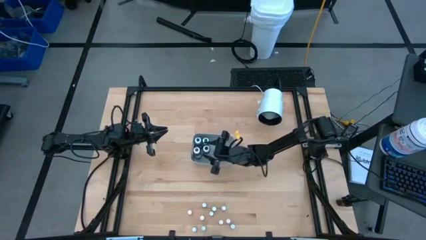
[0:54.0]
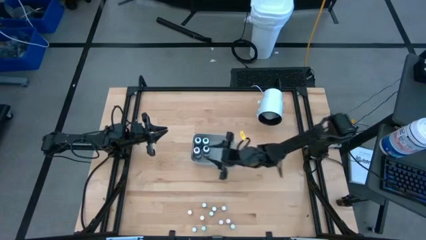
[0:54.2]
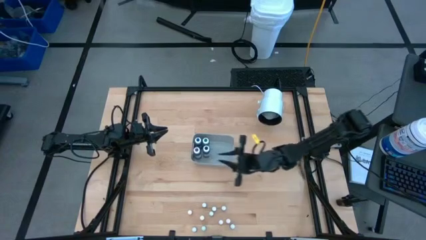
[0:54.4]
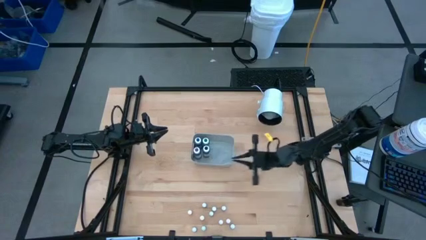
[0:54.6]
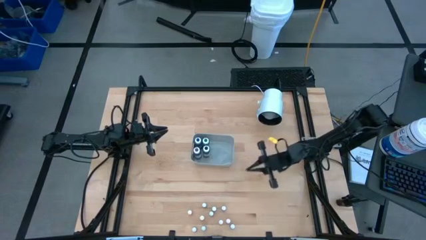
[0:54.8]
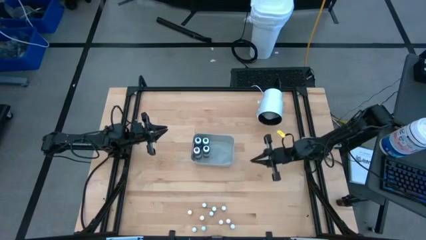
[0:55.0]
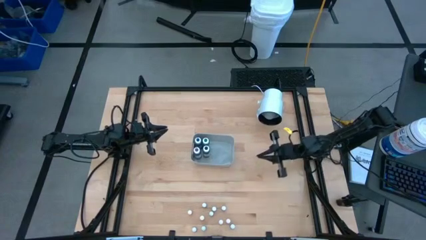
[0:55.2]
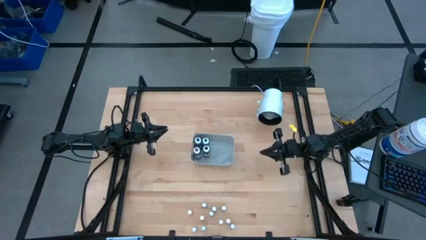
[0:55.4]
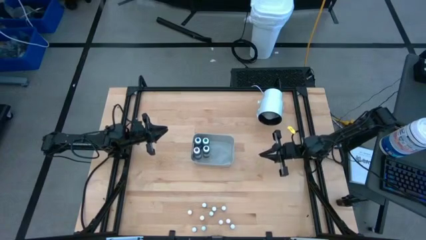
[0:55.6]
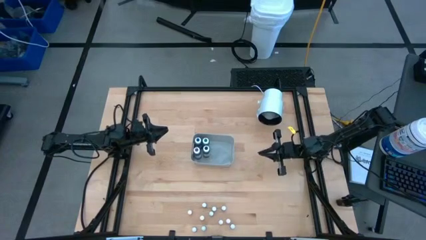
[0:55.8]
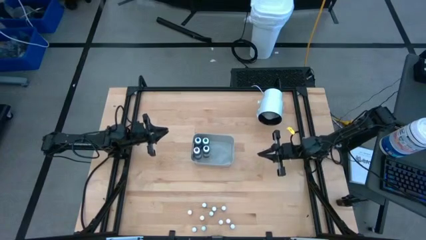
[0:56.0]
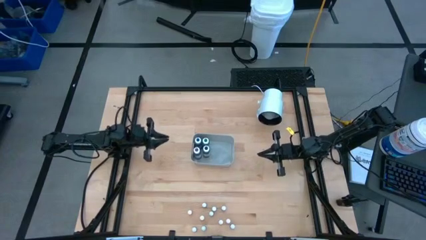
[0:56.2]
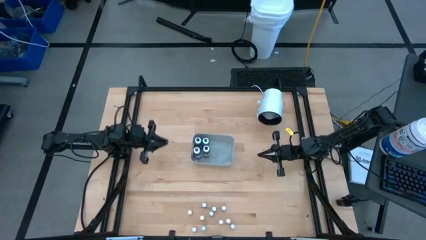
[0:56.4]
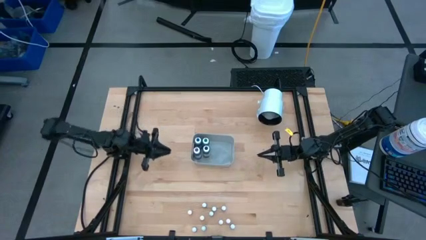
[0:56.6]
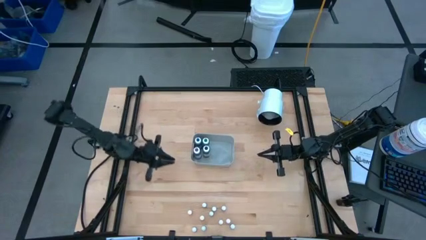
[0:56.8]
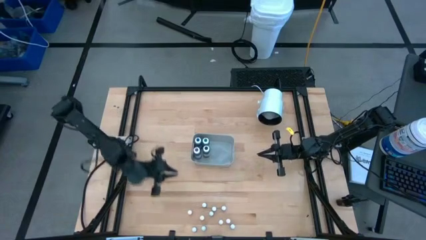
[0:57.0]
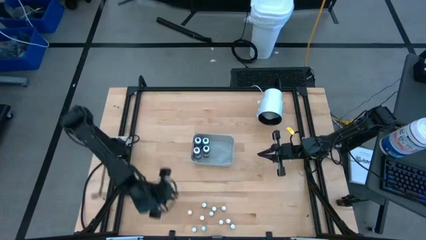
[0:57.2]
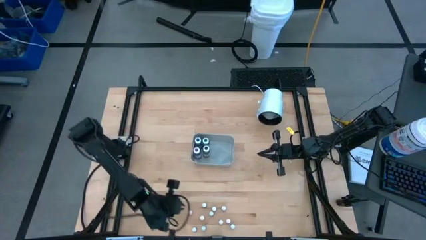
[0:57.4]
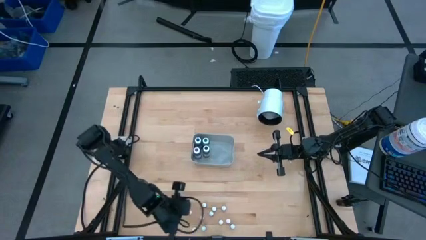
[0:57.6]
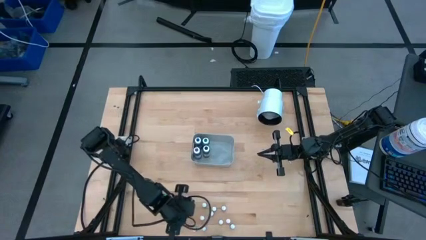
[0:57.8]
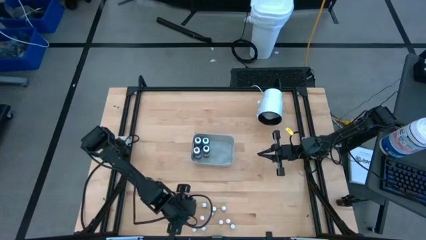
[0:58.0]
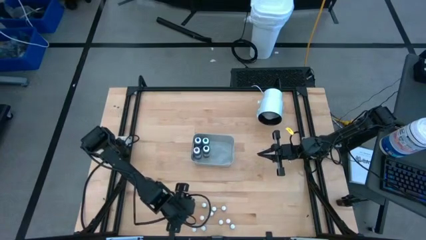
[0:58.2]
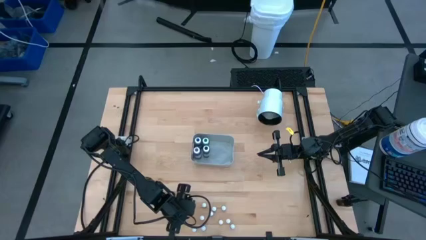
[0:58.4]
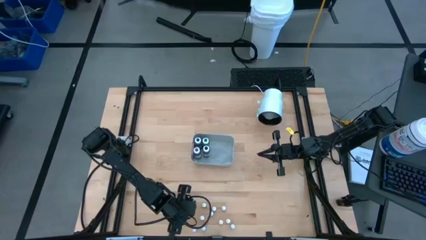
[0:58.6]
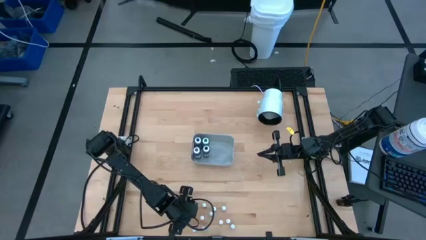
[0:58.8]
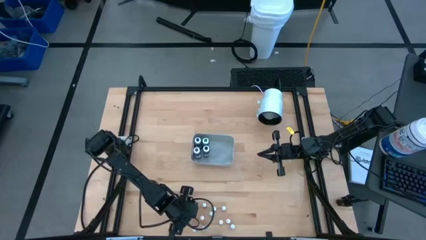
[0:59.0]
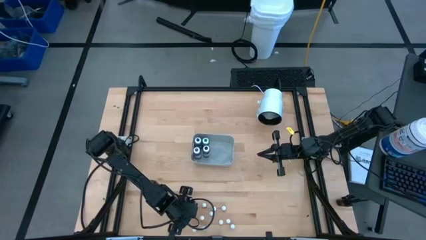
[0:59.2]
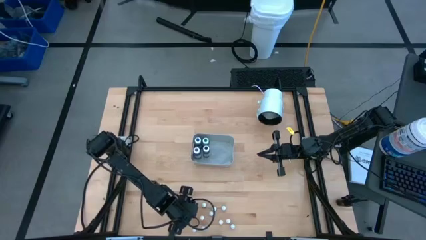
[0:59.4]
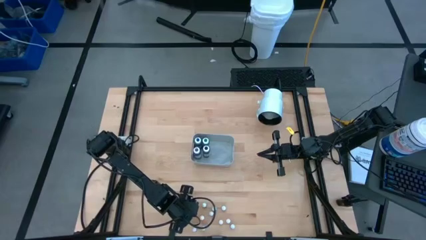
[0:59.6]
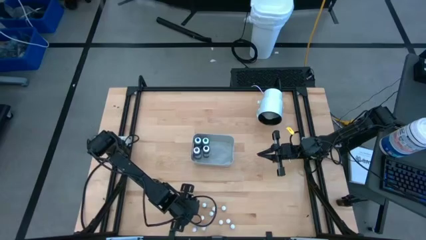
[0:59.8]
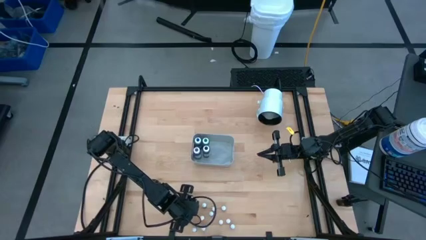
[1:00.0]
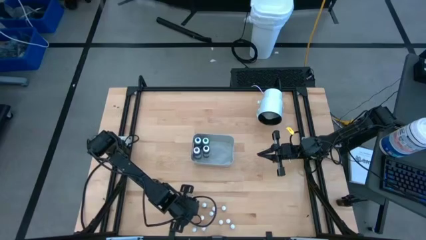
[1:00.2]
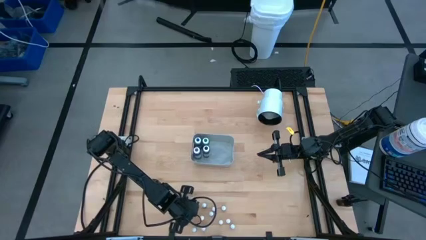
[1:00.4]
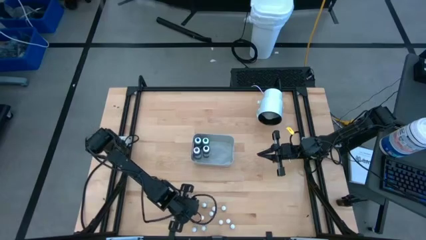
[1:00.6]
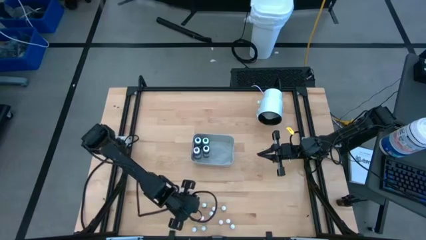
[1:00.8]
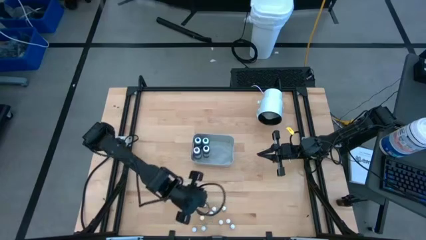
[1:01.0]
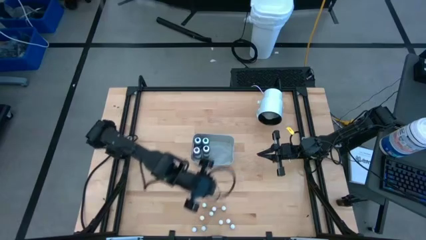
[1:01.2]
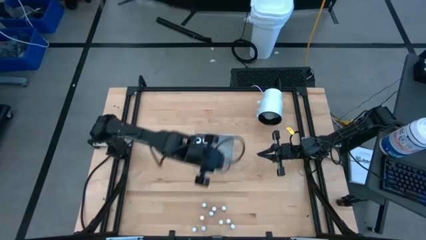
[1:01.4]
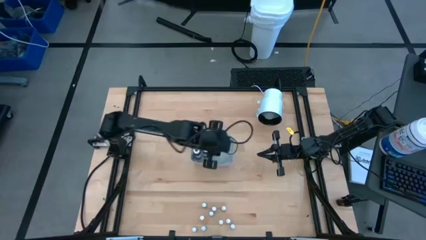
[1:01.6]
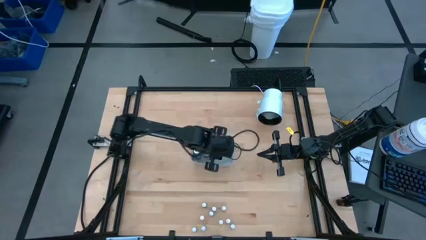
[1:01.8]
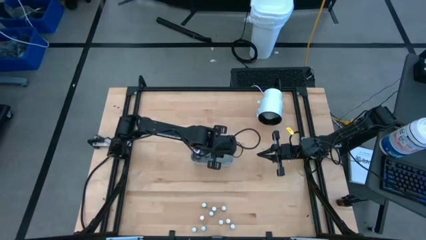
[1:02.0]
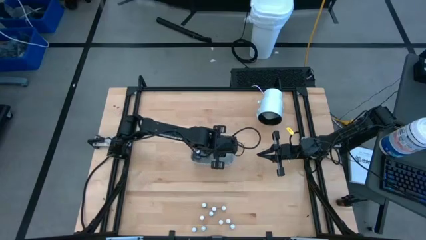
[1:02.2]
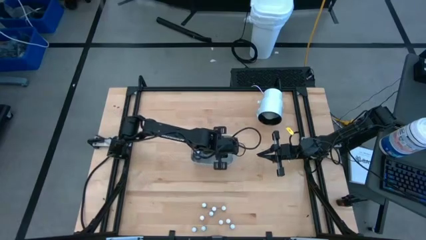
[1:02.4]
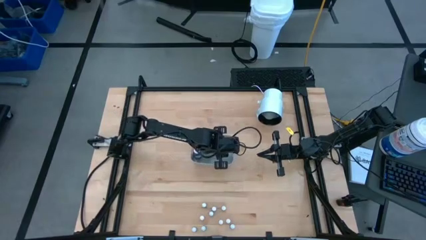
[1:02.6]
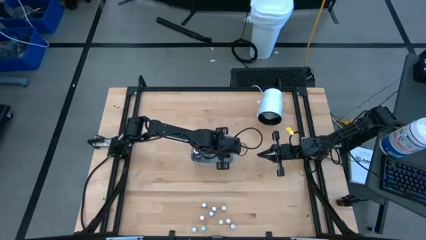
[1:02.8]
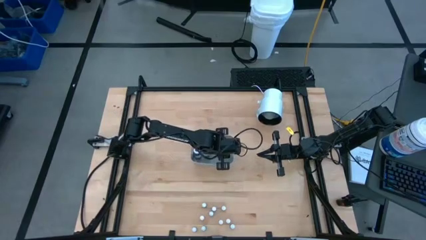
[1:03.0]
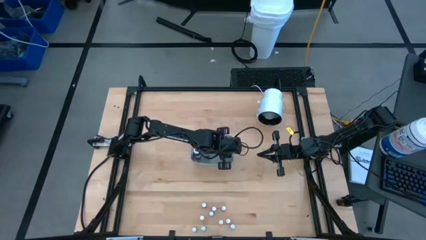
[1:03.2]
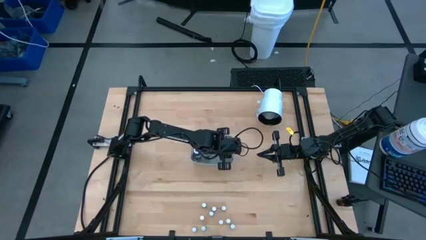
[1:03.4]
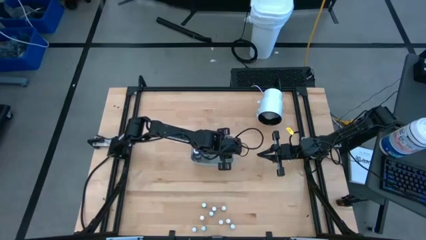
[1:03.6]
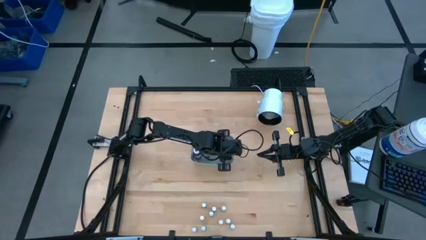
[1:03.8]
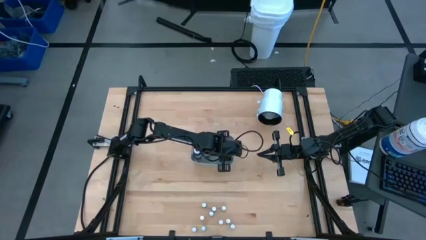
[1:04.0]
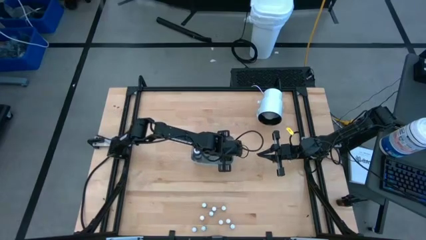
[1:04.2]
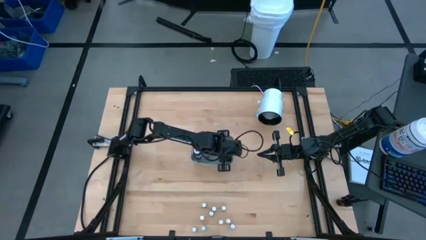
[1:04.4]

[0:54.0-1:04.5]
Task: Pick & Place food coloring
Put the orange food coloring bottle into the gray bin

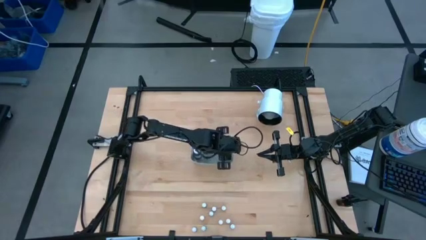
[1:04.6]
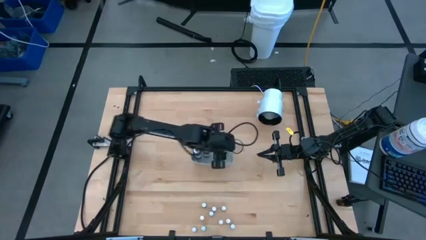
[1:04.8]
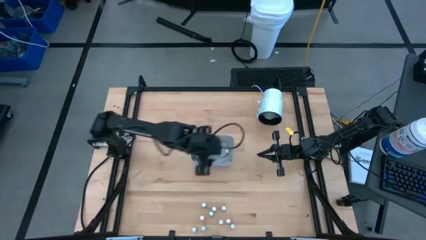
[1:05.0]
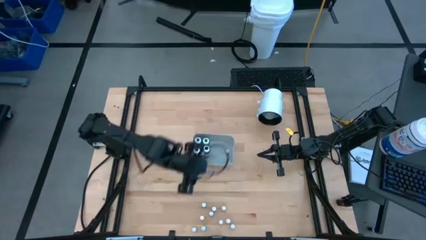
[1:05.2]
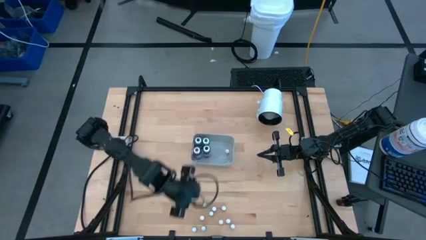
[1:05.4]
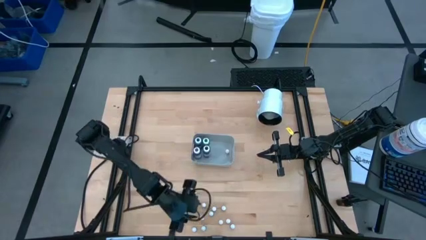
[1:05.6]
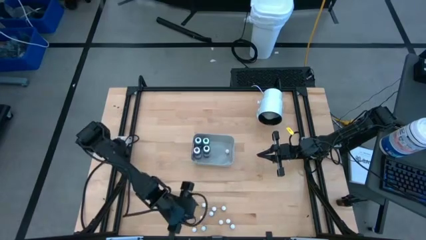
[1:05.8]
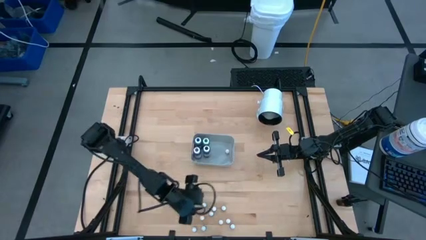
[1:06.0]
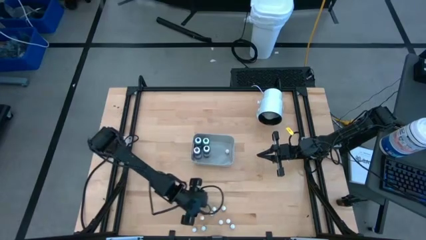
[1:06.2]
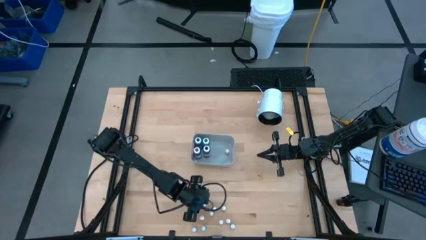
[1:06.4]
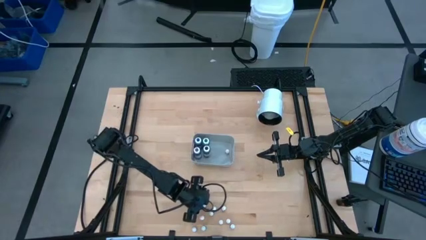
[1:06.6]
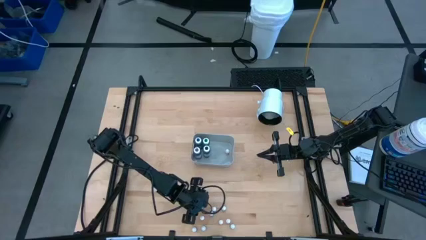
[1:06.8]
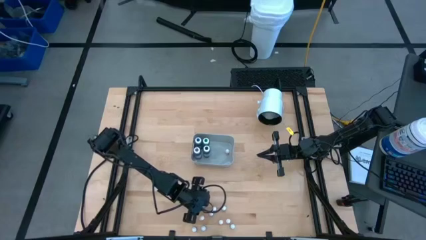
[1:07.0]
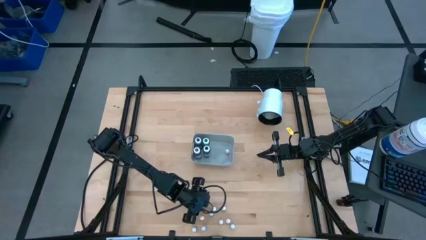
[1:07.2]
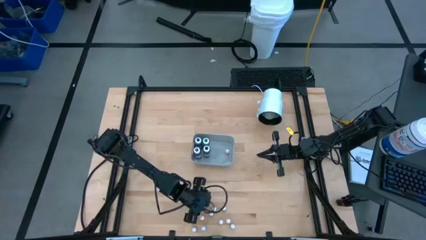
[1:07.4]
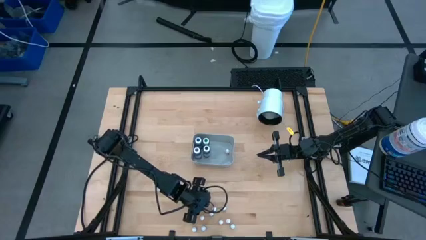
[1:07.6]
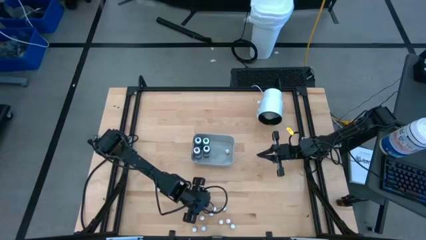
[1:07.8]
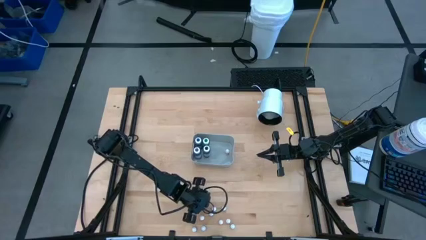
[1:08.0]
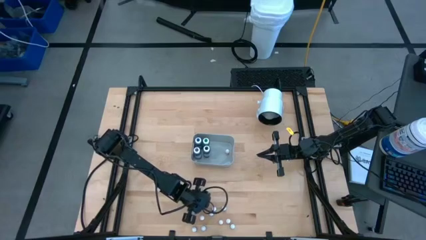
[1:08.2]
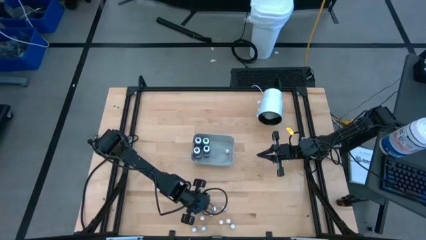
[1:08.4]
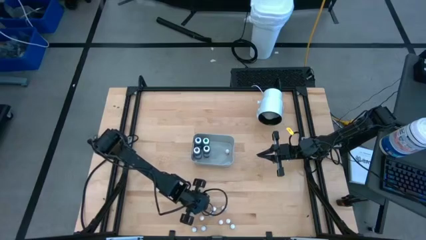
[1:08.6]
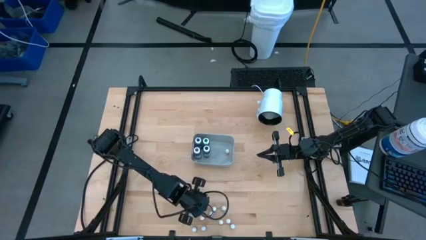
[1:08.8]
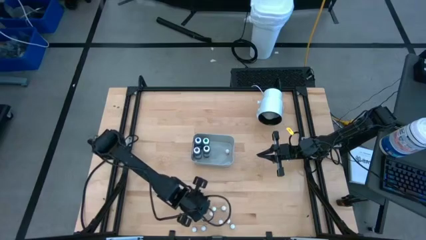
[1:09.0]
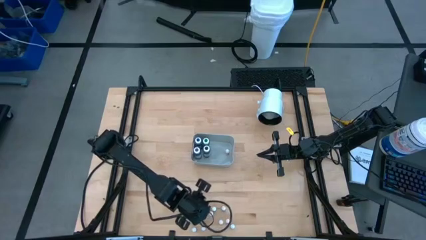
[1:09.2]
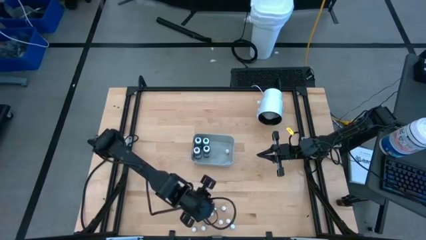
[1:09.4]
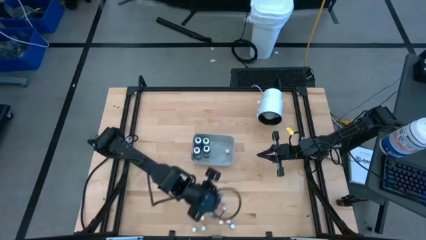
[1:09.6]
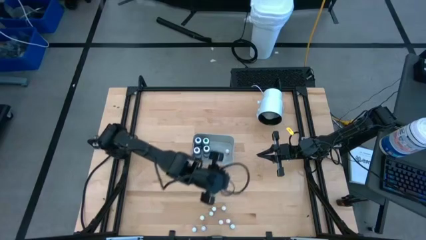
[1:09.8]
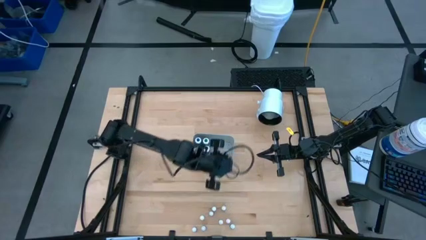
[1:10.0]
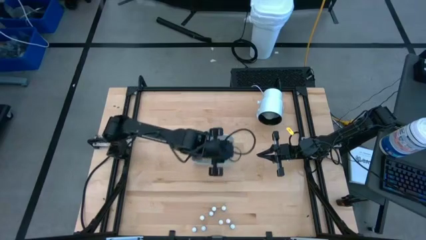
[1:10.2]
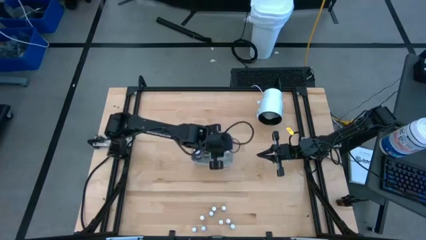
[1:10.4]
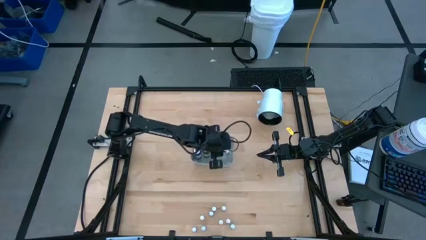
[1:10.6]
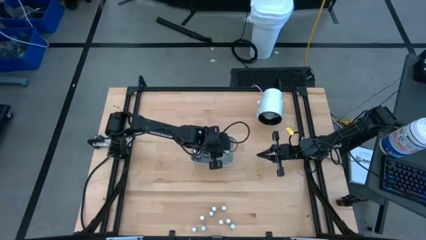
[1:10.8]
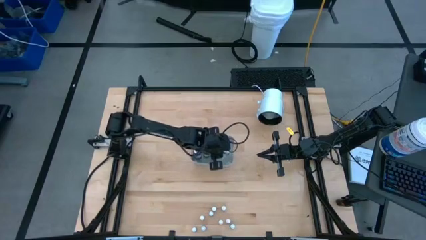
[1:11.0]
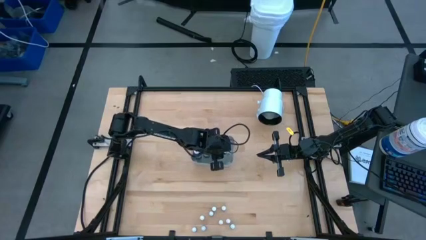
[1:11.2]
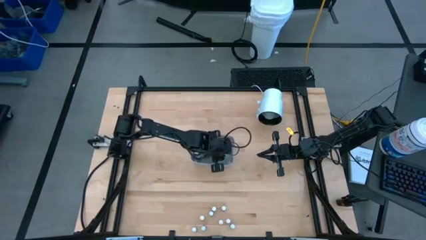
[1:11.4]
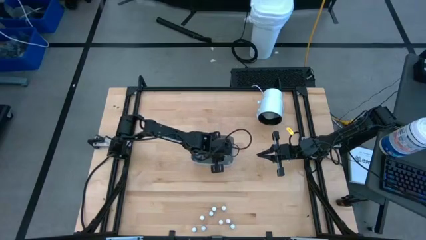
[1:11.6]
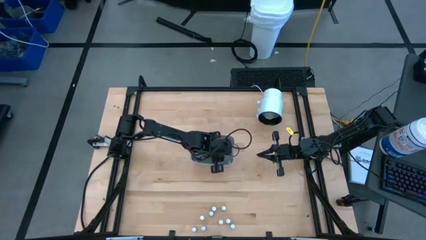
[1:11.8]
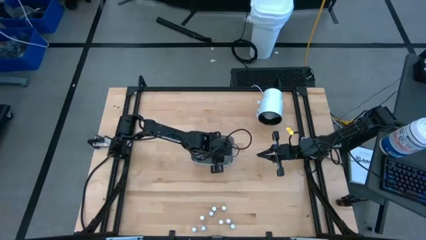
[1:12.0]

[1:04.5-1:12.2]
Put the purple food coloring bottle into the gray bin
